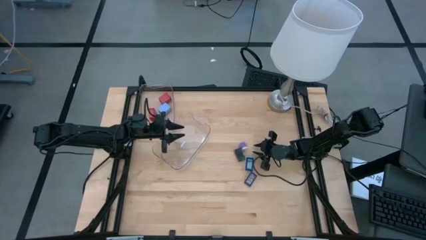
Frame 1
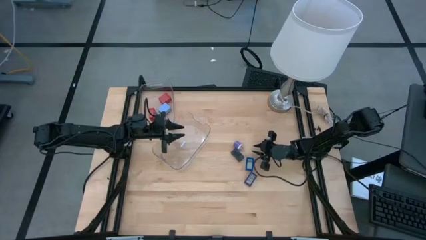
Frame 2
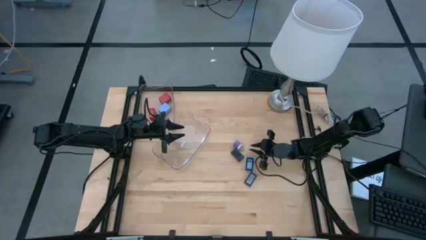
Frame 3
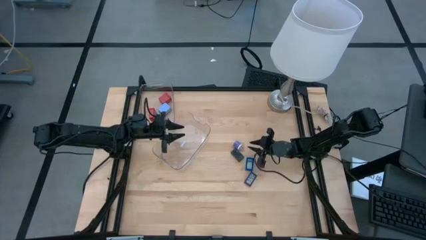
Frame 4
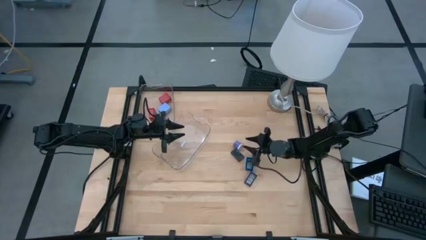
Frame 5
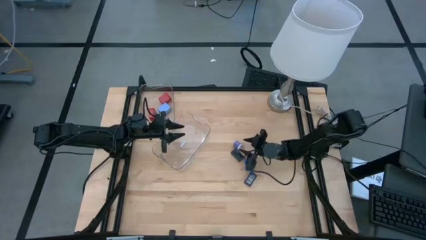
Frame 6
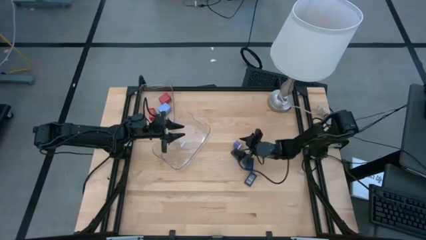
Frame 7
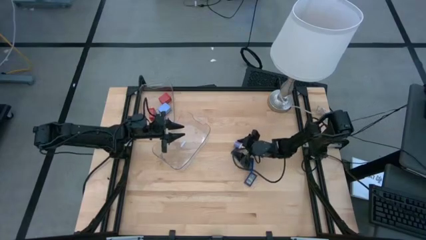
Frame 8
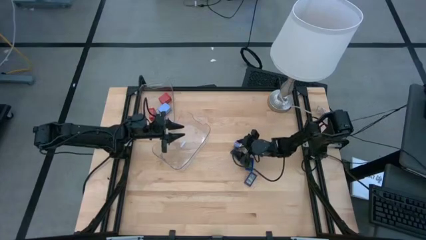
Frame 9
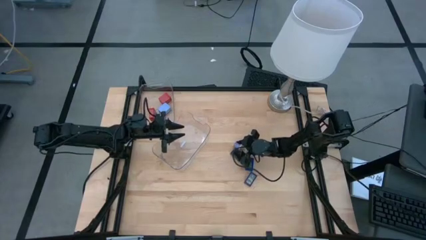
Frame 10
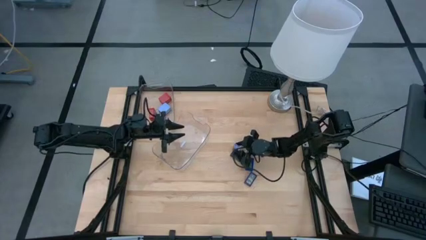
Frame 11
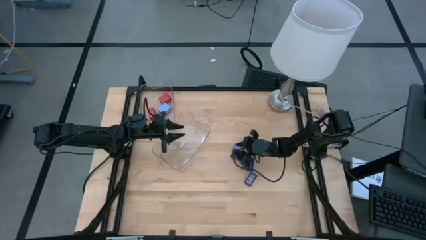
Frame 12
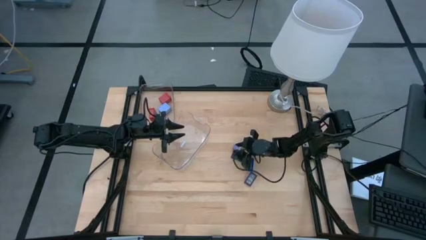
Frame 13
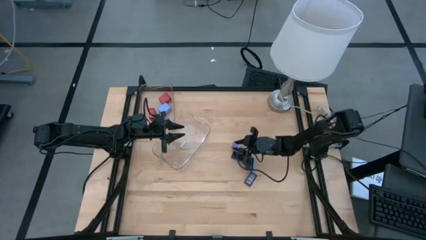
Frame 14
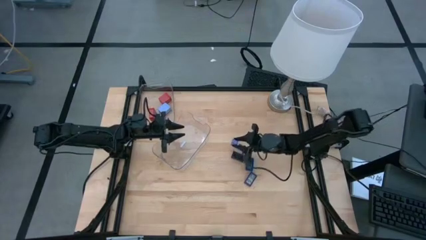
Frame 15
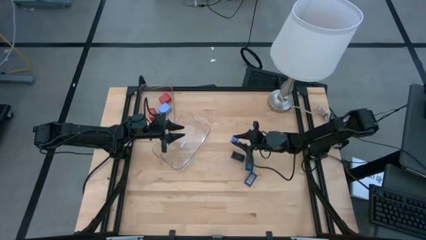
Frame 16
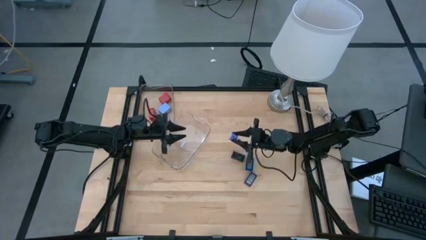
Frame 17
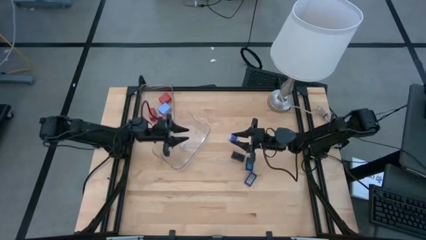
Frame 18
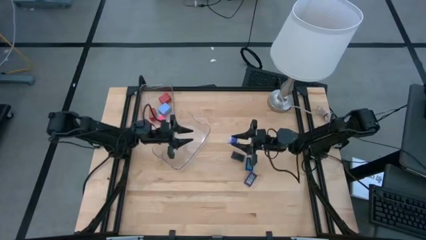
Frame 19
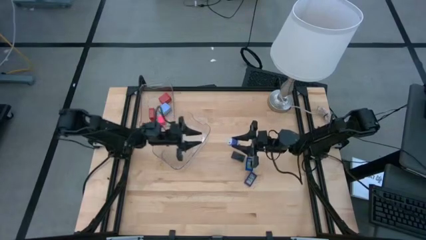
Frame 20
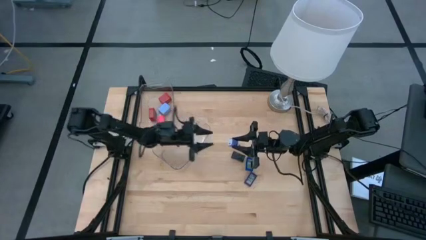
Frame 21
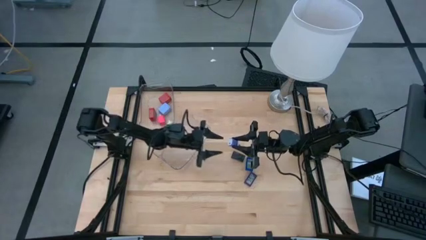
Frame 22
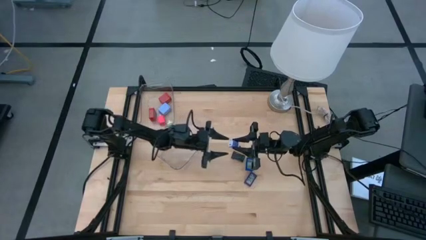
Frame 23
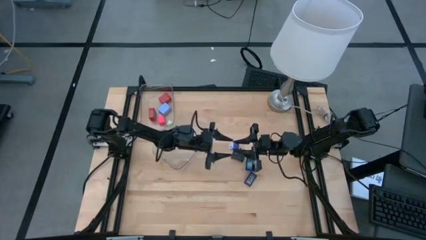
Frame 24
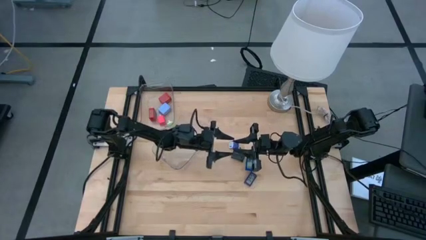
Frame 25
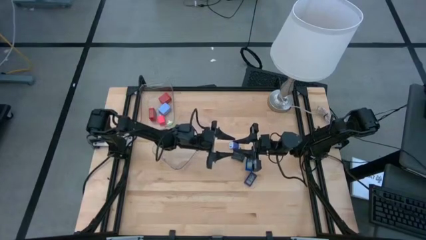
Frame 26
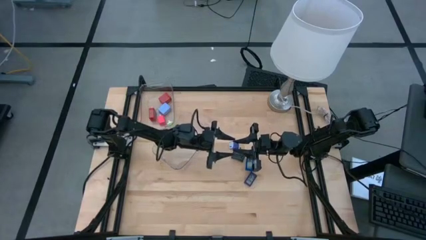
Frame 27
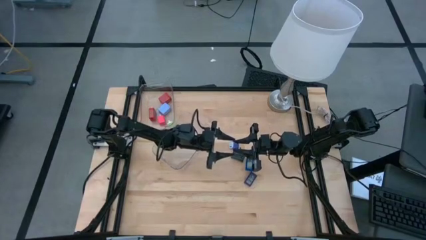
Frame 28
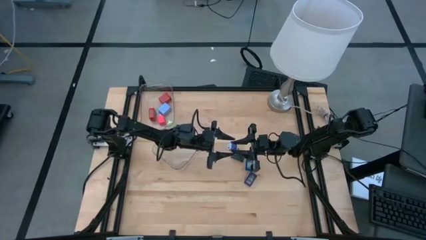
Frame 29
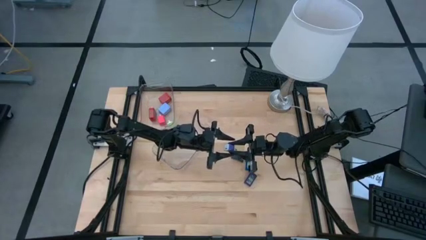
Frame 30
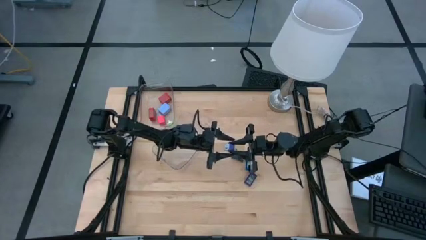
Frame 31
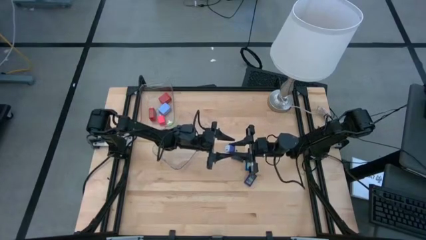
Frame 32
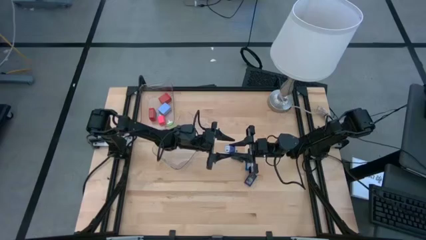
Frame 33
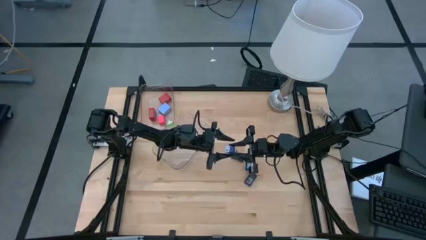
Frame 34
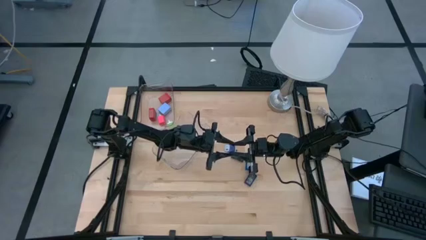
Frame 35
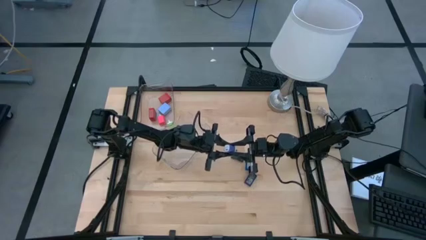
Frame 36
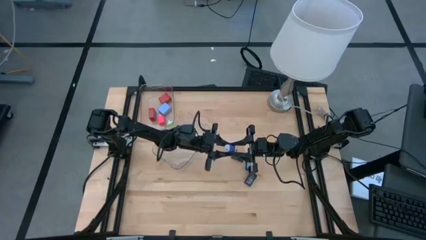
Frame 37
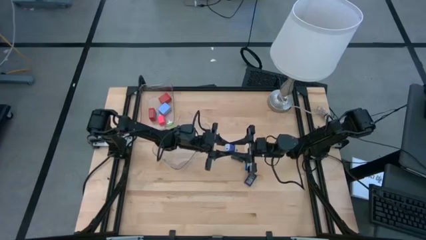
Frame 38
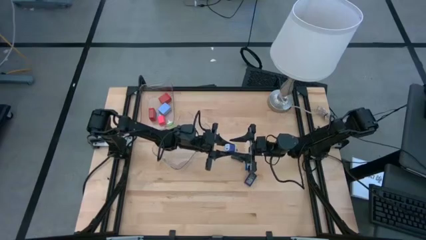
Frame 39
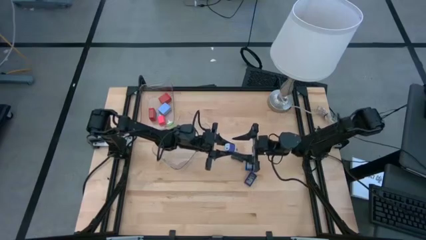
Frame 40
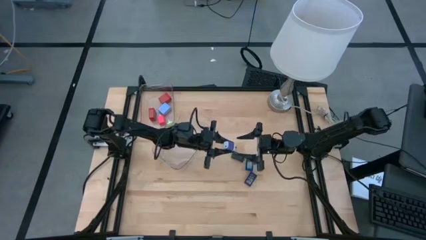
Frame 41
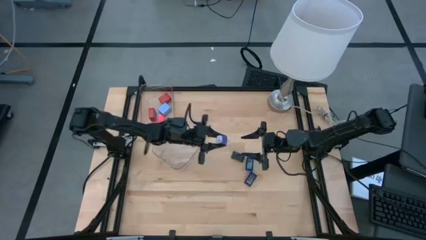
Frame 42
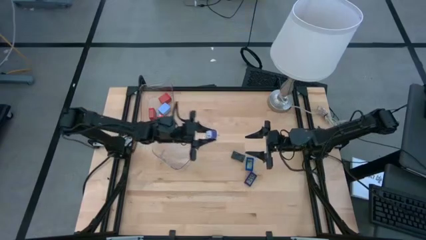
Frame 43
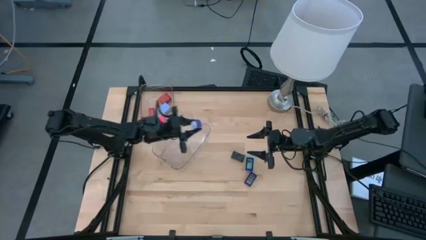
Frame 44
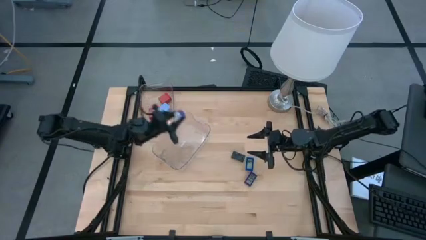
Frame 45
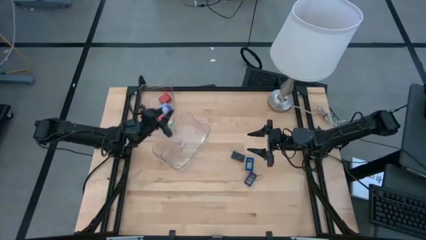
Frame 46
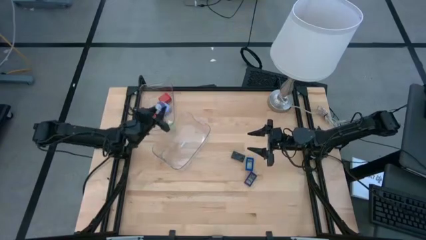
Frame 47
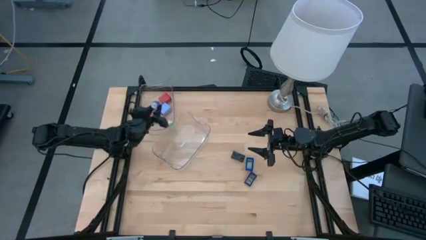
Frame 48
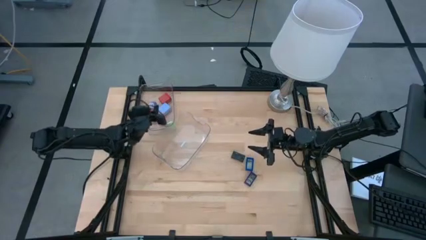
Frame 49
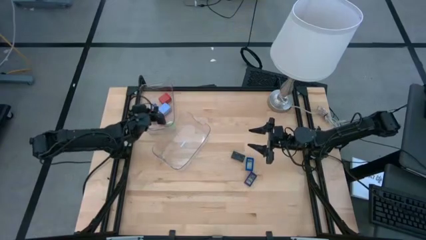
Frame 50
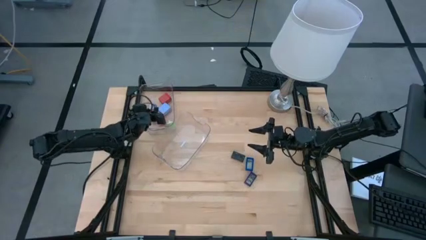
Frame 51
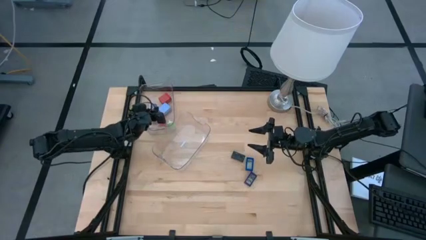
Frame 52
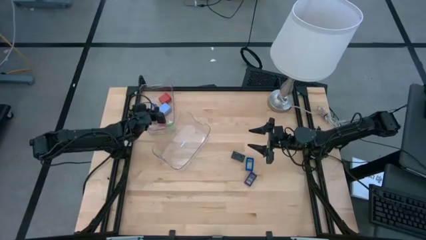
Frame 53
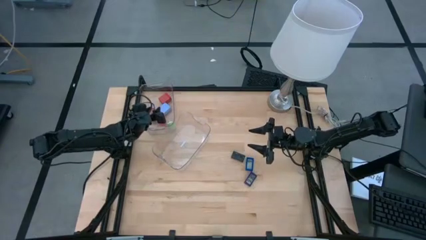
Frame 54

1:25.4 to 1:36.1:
Task: Pick & Place Office items
Put the blue charger adapter into the top transparent bin

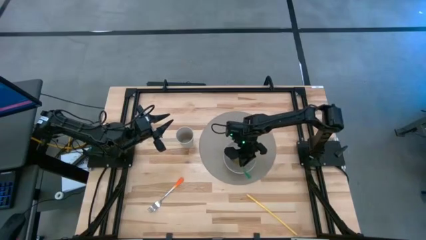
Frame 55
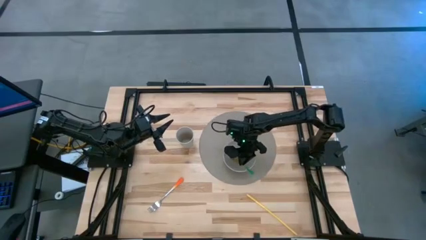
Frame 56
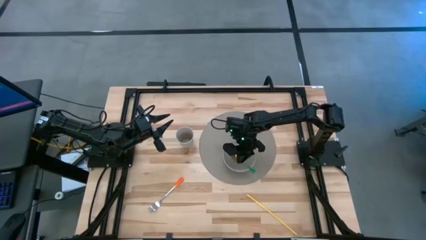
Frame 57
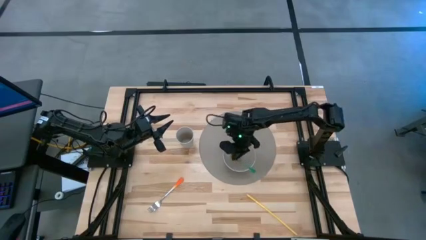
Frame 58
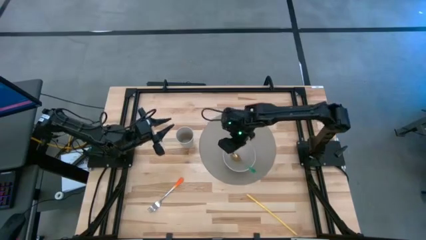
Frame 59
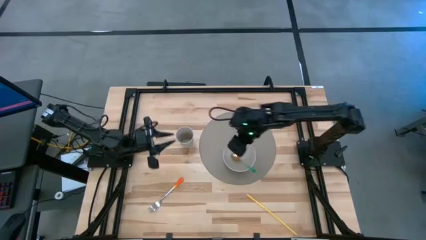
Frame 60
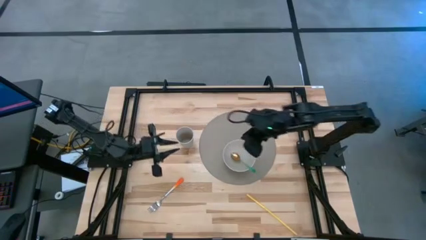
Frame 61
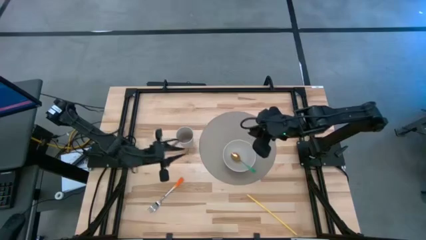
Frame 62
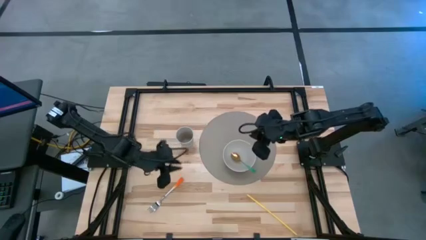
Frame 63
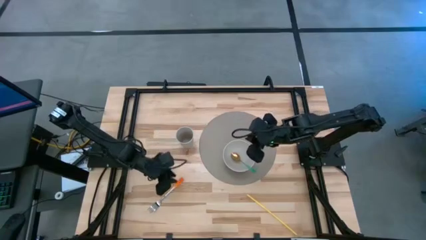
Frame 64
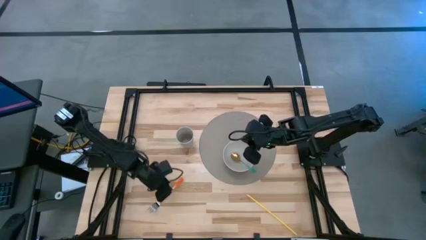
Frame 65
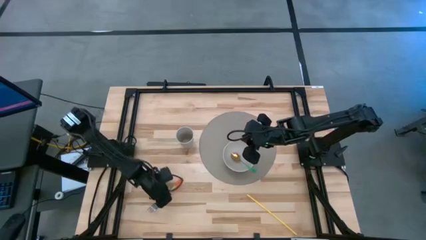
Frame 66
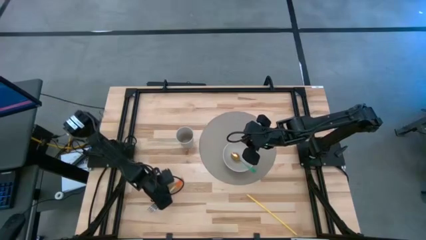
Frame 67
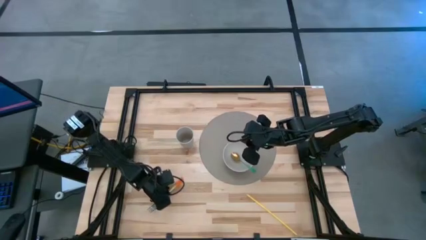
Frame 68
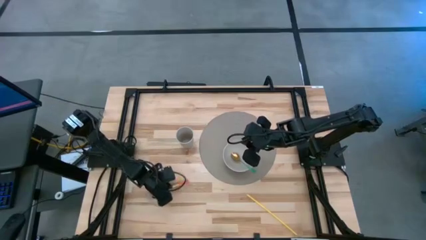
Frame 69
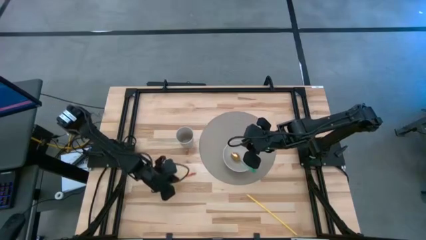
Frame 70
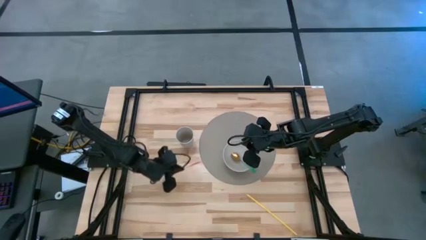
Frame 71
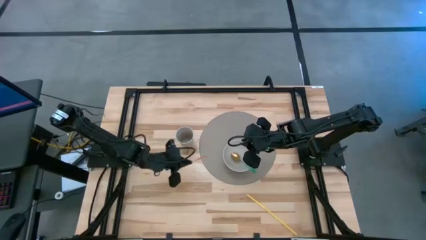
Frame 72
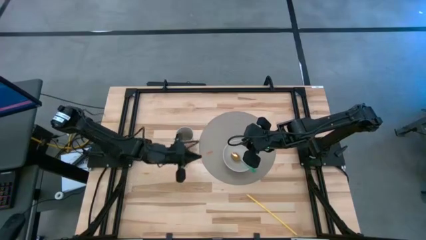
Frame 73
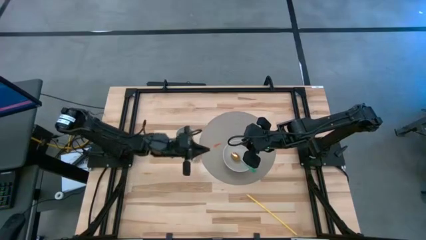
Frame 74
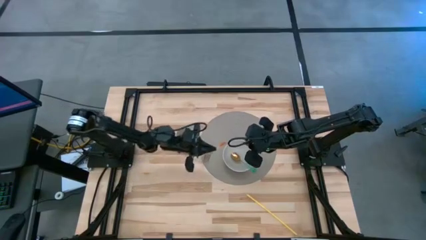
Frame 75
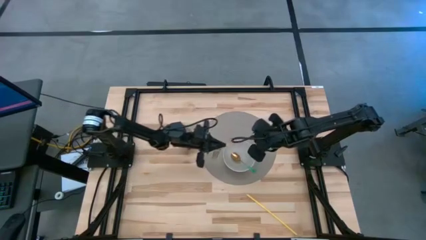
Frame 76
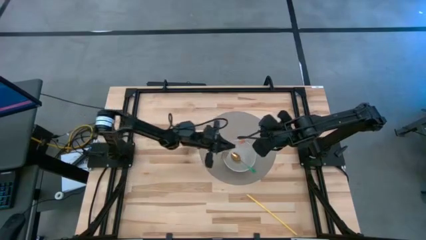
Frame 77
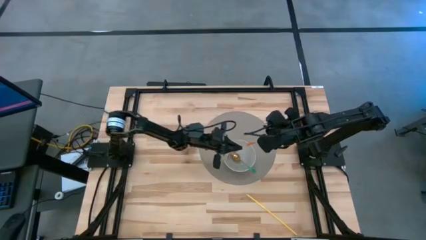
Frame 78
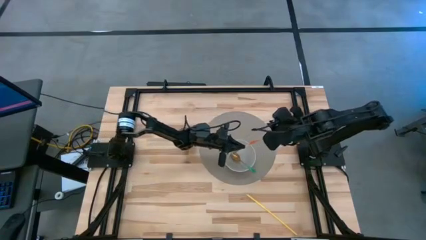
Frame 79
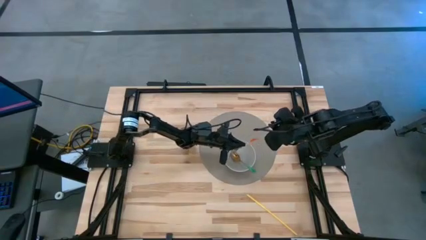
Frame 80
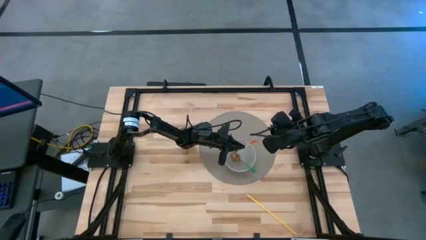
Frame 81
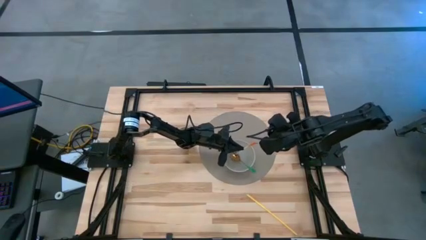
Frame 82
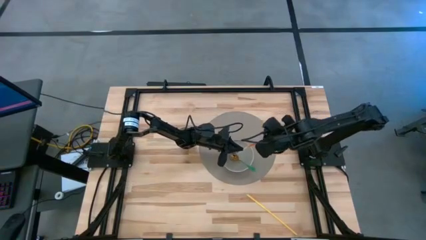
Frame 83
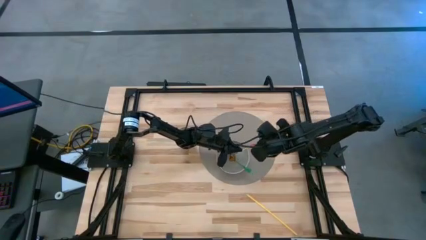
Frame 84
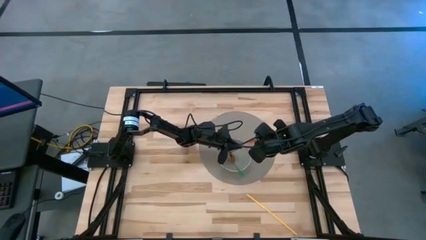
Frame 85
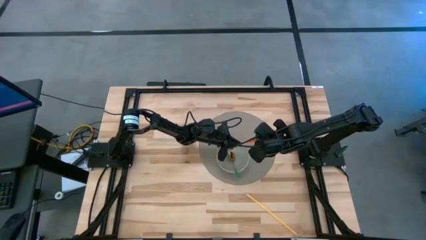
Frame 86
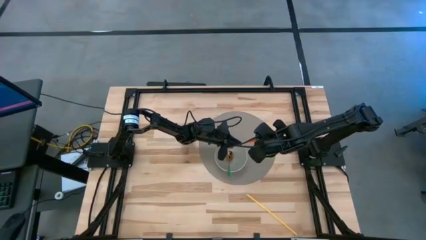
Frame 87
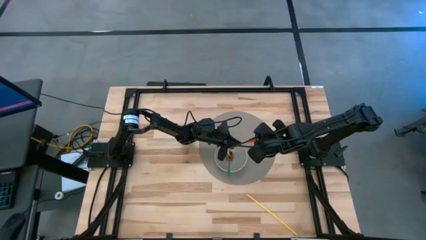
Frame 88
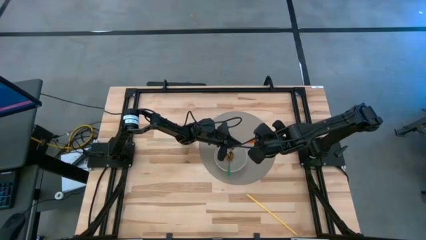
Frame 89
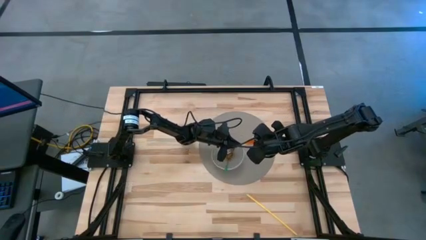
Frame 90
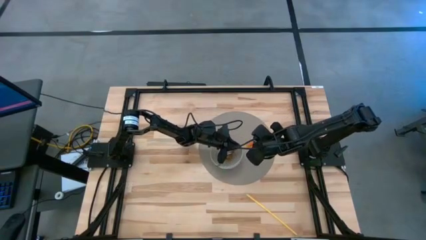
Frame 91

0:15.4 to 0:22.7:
Task: Pick & Place Utensil
Put the orange fork into the bowl
